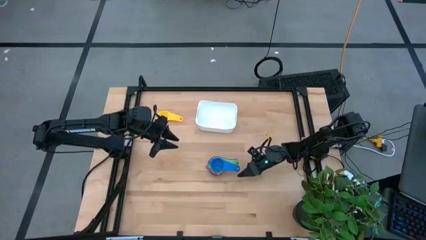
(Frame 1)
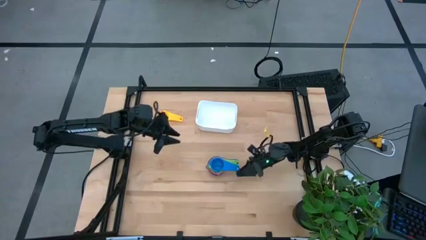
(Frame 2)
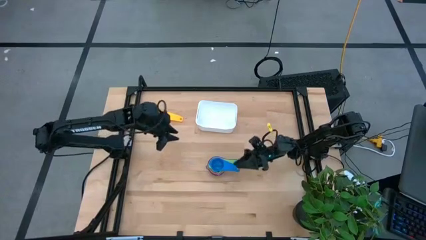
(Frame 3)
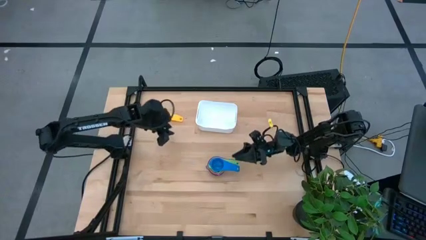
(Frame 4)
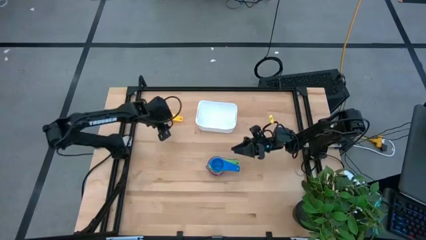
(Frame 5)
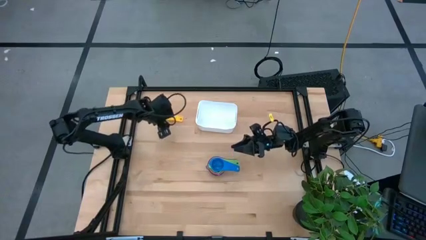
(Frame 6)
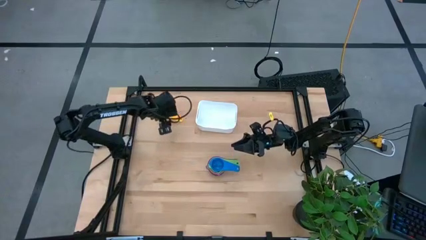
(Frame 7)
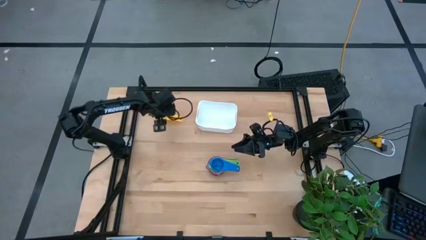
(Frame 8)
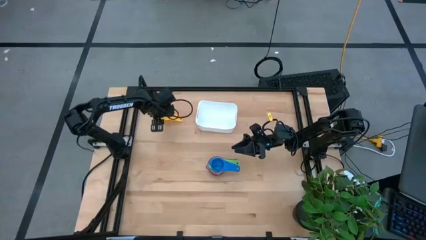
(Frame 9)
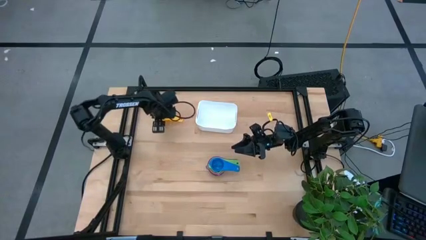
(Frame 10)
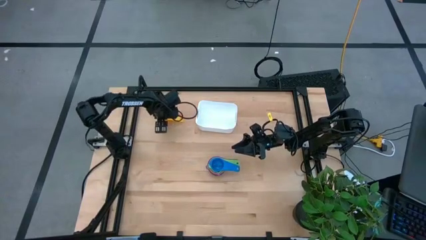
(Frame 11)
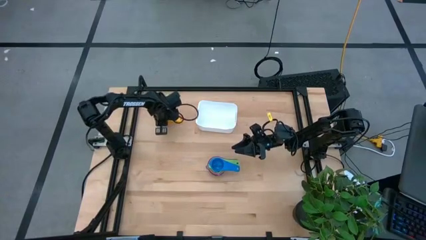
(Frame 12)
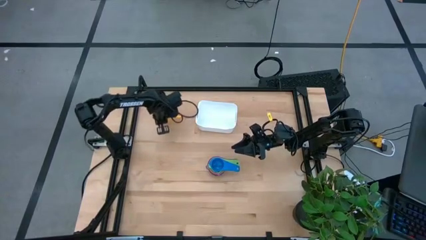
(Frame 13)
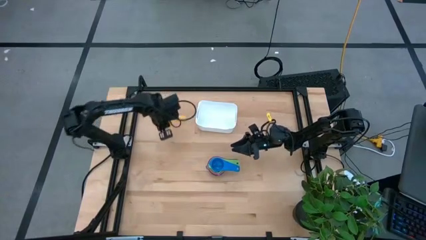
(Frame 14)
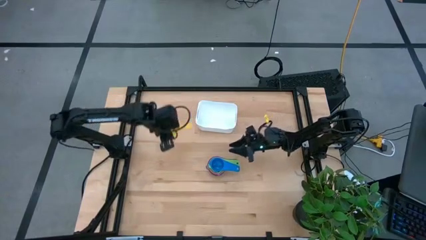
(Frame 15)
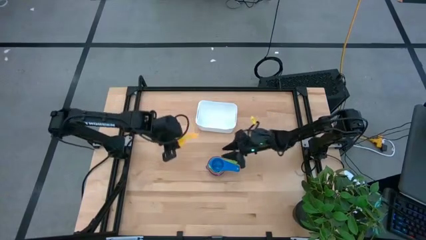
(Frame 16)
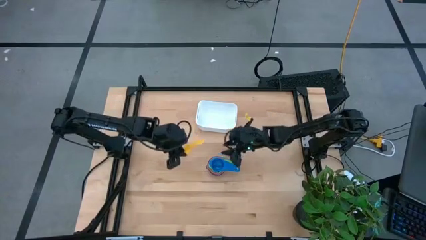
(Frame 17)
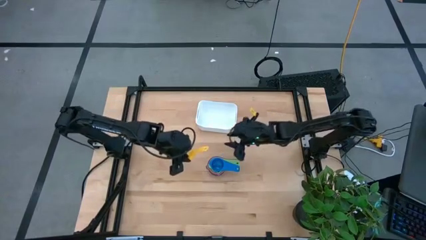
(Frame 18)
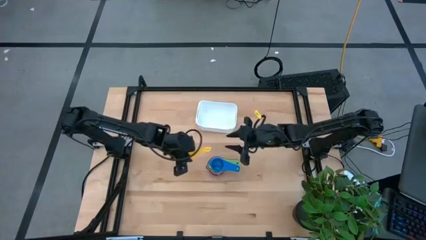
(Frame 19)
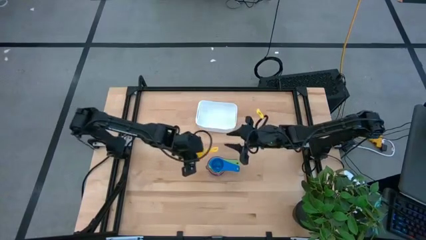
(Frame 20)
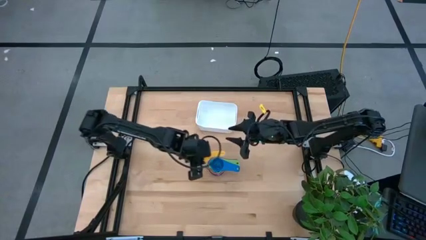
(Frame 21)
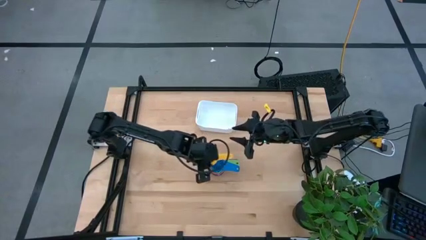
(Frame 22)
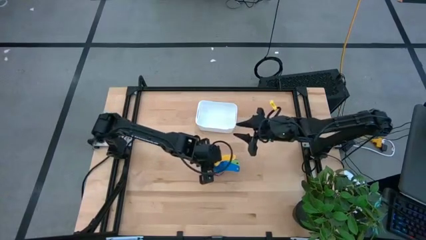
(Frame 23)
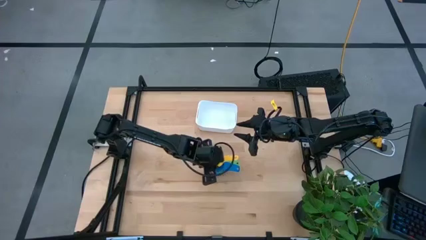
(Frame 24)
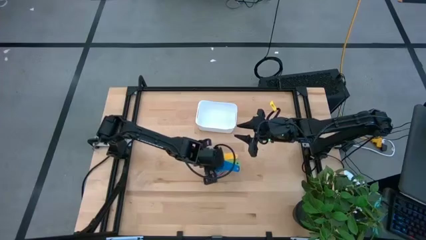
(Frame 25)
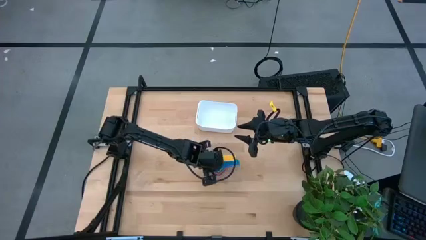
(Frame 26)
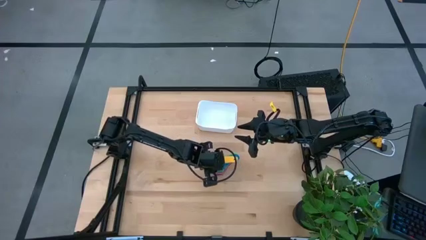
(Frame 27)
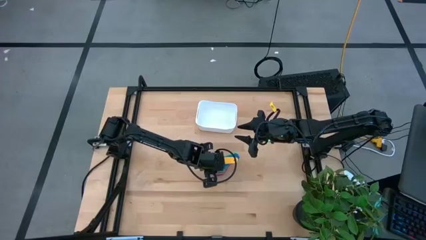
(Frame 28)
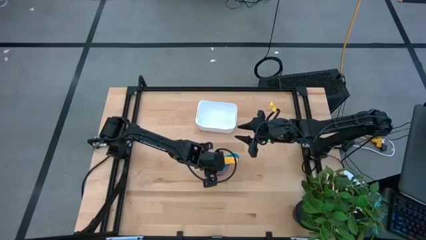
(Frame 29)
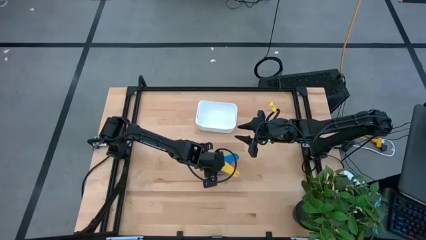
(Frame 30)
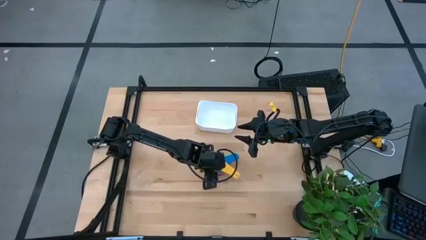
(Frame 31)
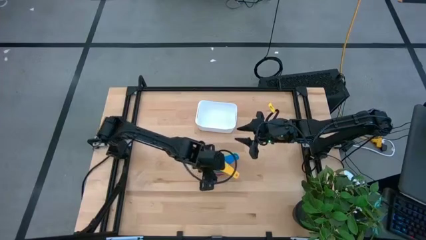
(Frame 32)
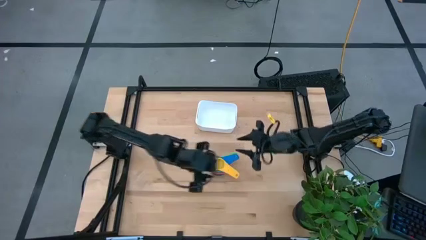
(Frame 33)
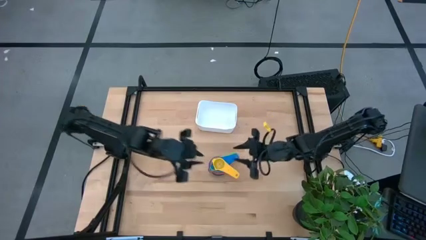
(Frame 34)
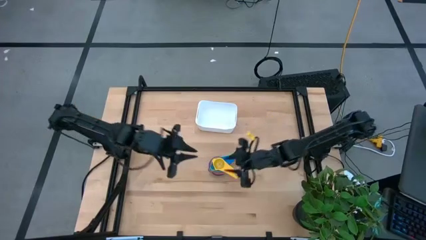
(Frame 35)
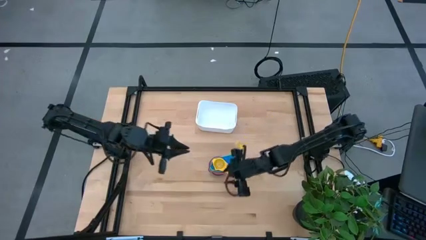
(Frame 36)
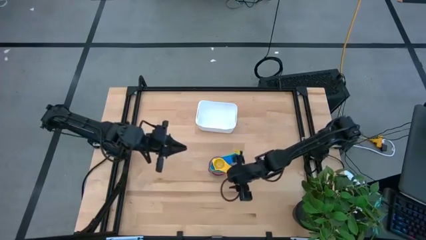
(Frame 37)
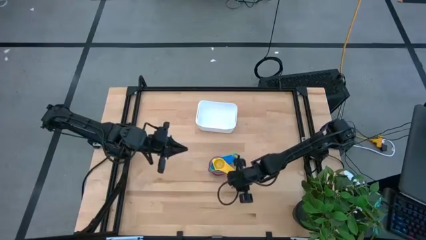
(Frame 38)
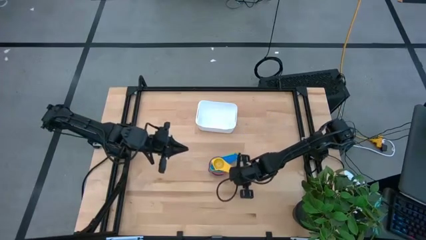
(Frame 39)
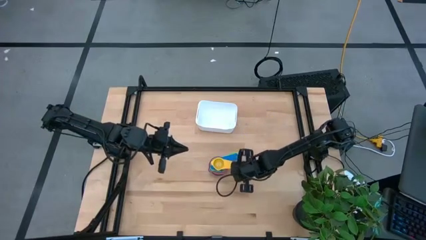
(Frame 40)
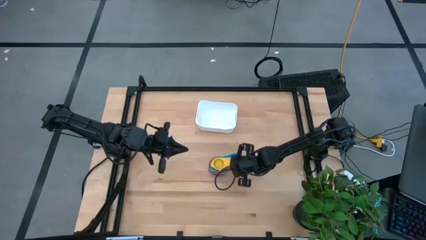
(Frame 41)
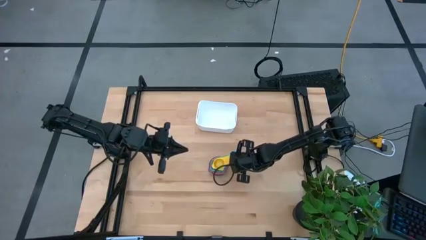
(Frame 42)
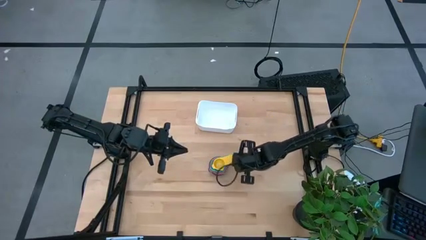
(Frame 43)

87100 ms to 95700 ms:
Task: Nest measuring cups in basket
Stack the yellow measuring cup on top of the dark blue measuring cup
